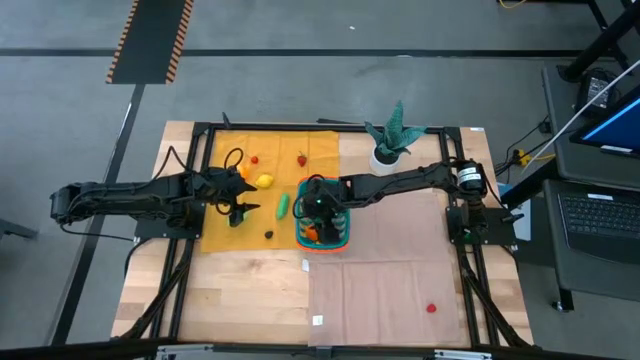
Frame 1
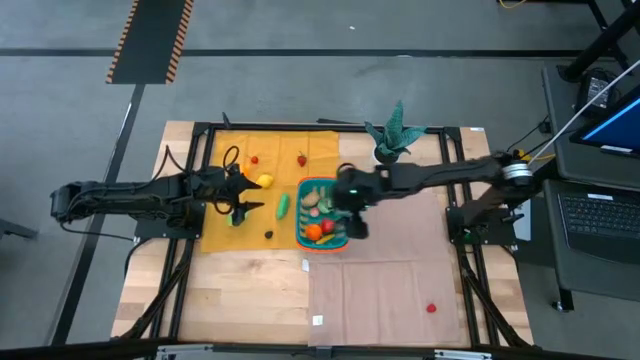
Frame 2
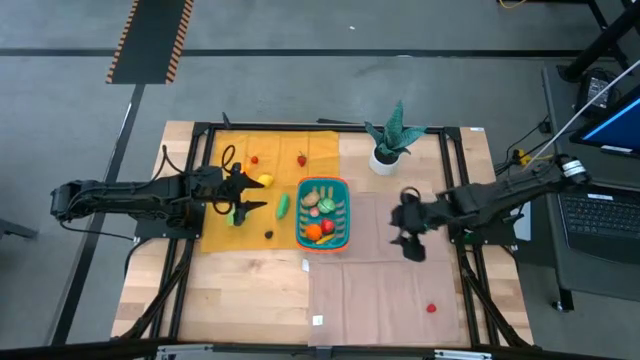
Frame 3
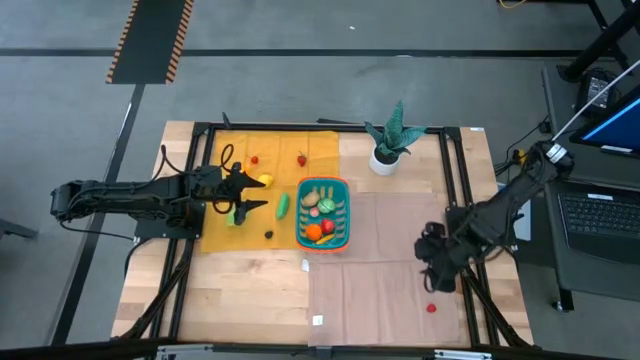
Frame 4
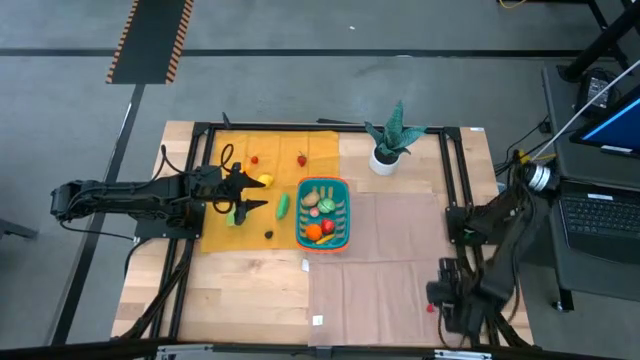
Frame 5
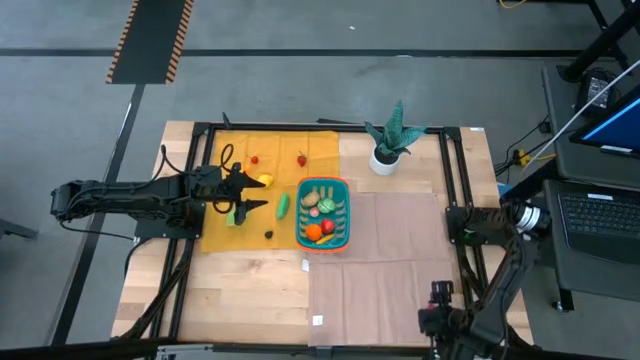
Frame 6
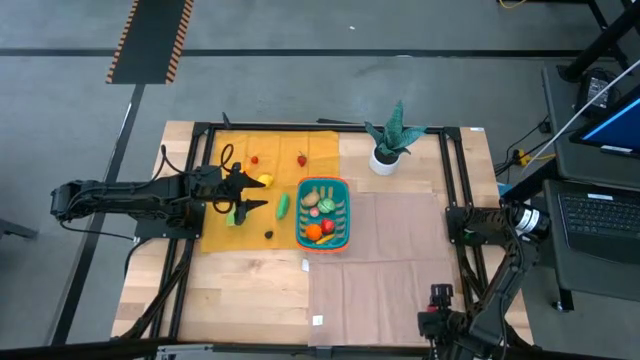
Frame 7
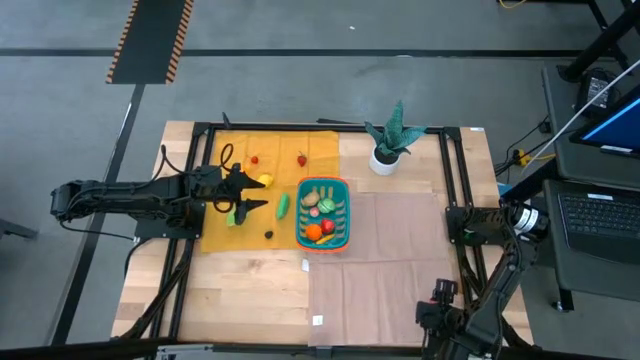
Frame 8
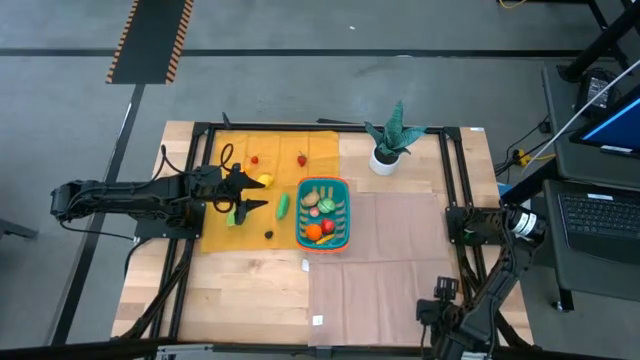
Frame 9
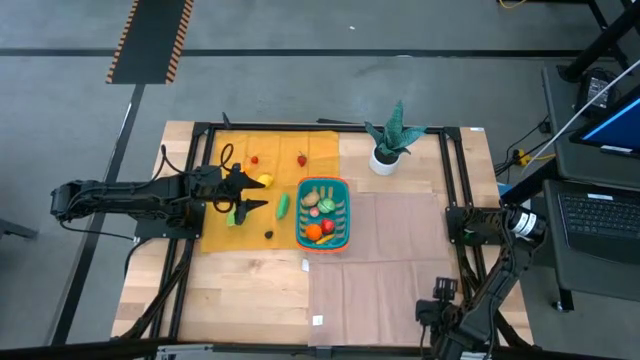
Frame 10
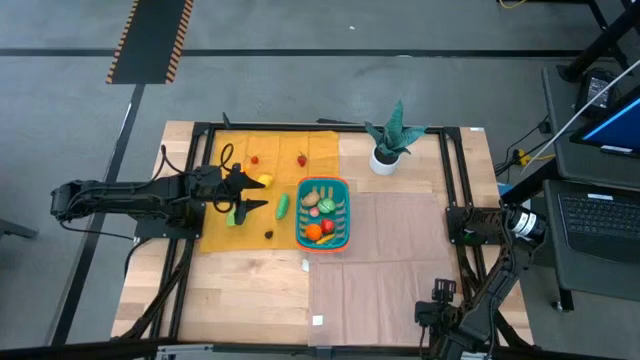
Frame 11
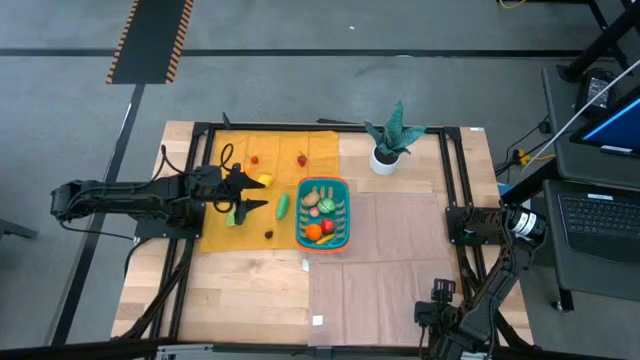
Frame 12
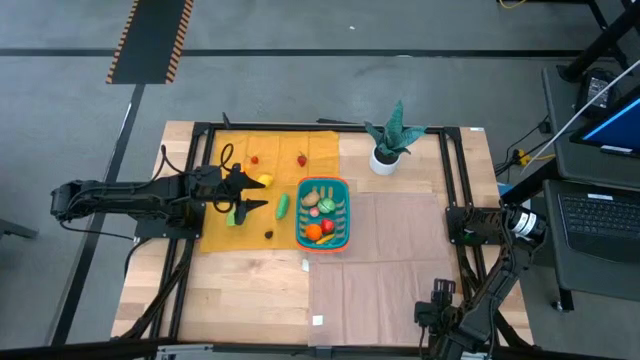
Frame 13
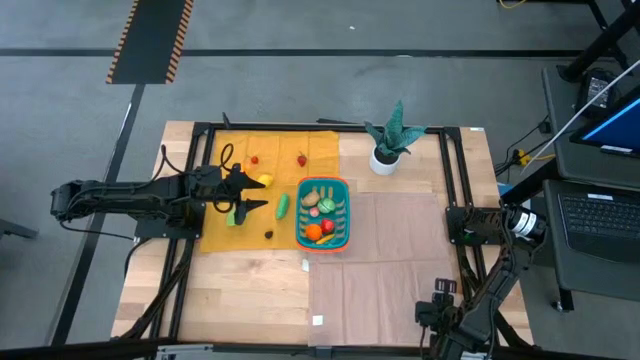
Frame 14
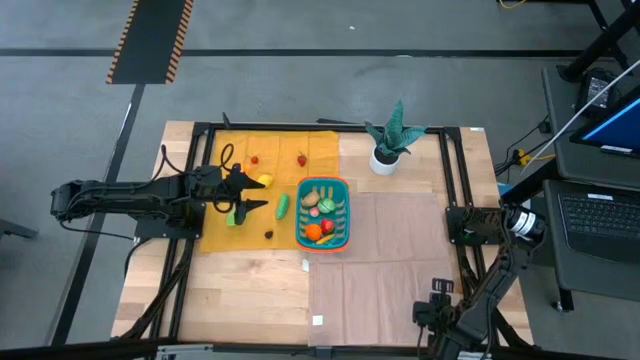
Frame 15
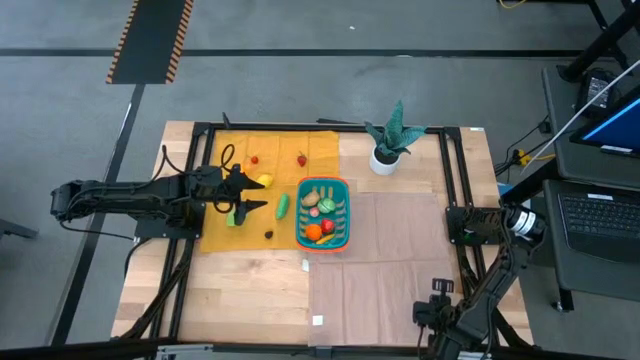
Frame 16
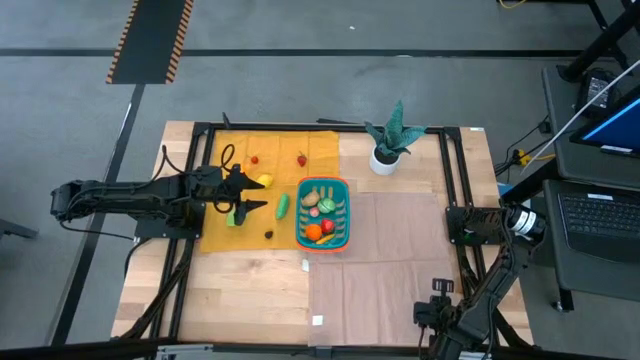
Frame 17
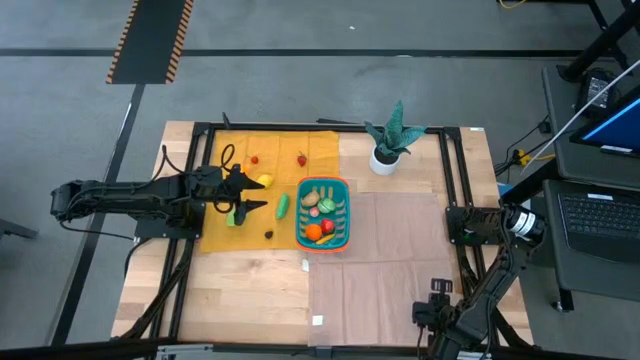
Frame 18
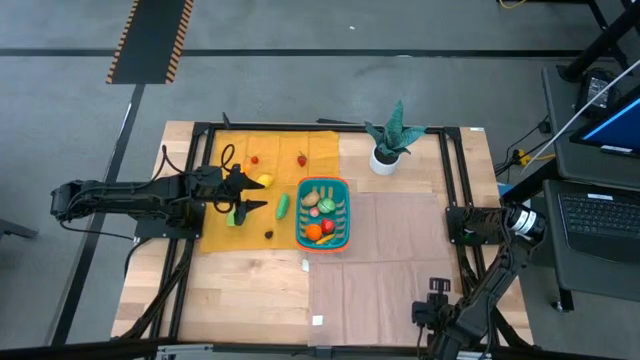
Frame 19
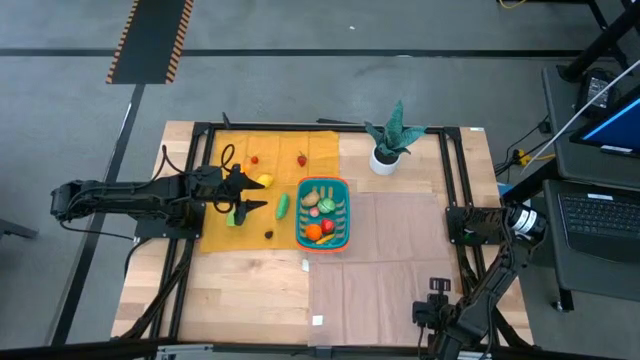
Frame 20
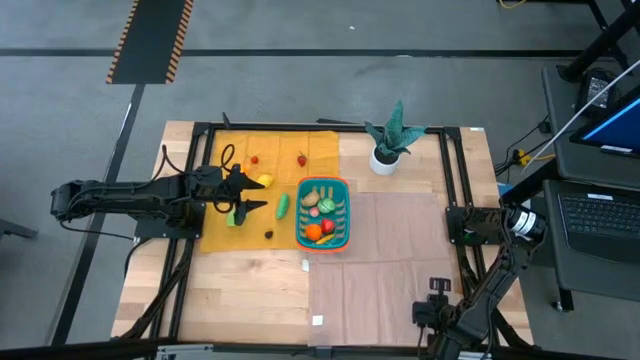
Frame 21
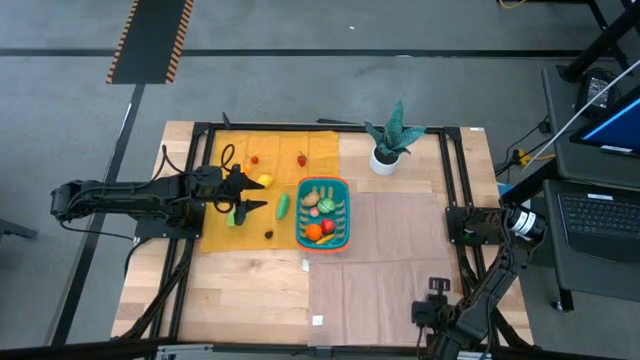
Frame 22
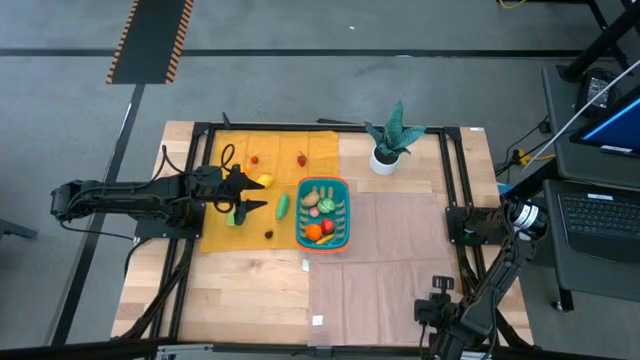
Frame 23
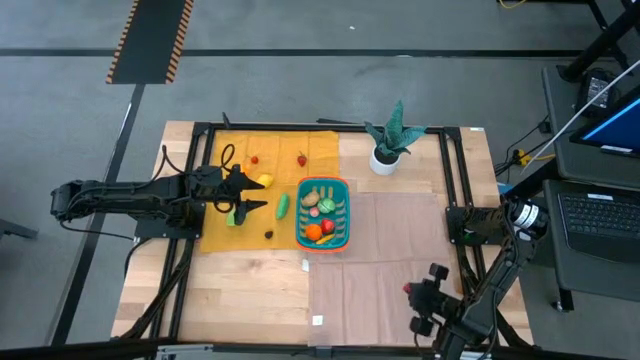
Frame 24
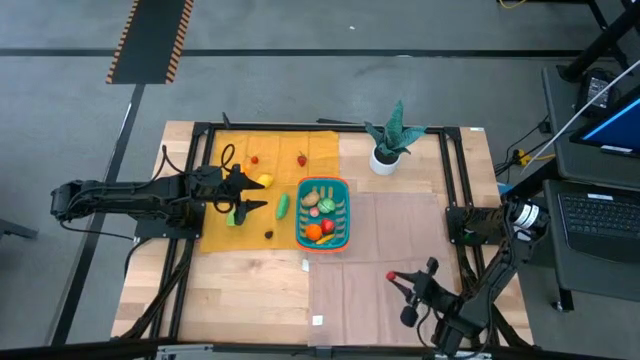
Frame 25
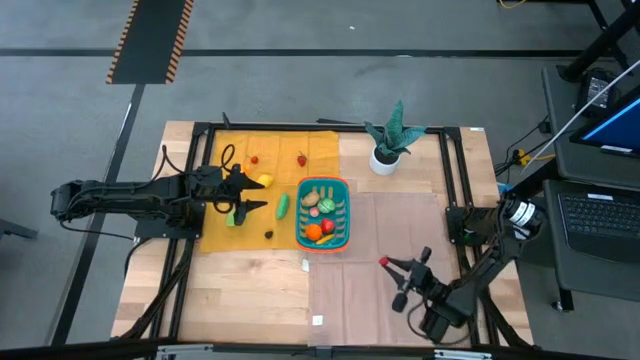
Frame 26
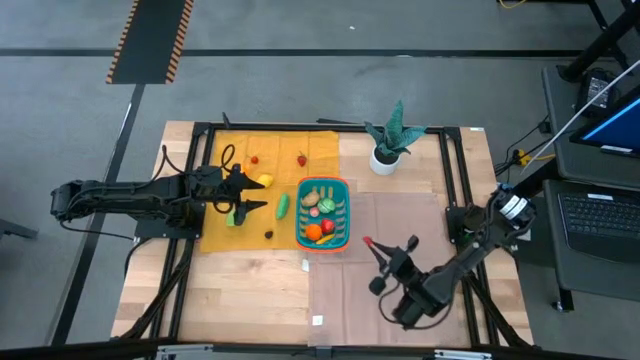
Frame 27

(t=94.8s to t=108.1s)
Task: Pick and placing Produce into tupperware
Put the bottom raspberry into the basket

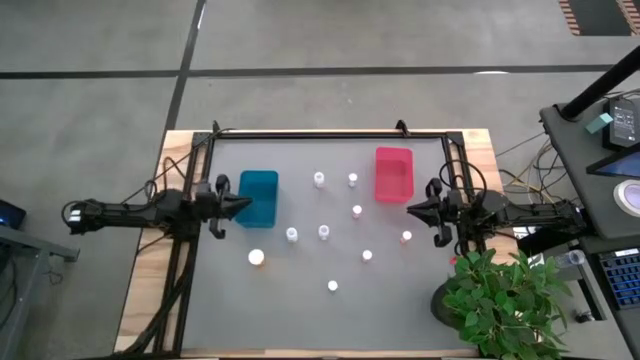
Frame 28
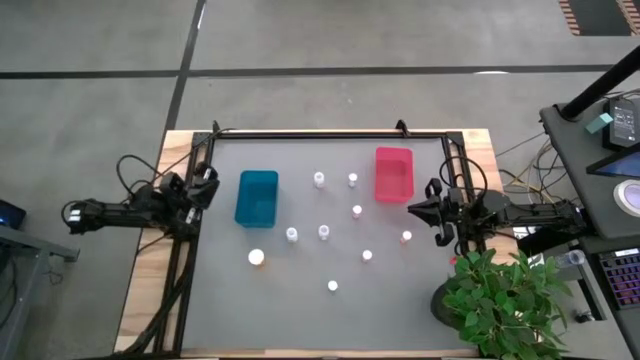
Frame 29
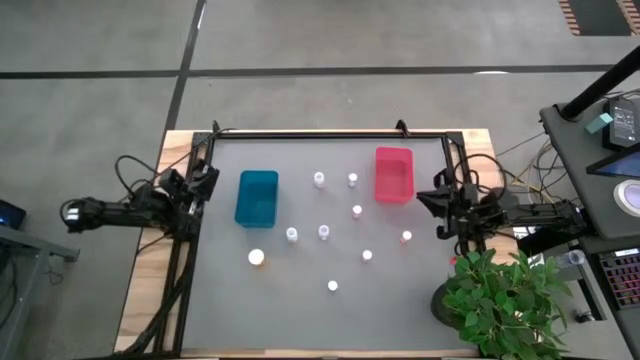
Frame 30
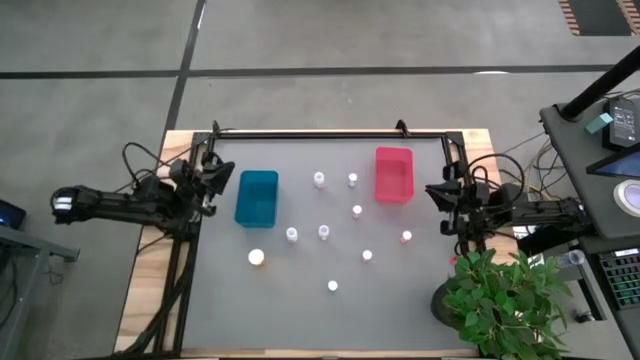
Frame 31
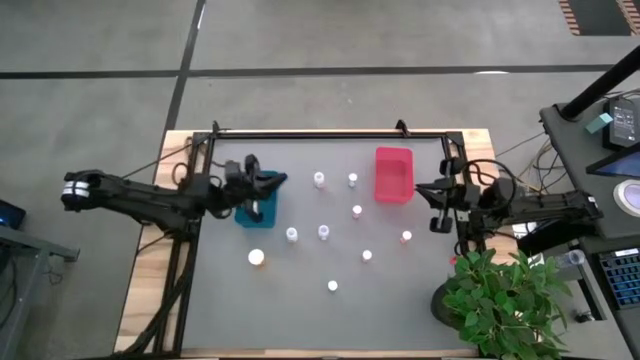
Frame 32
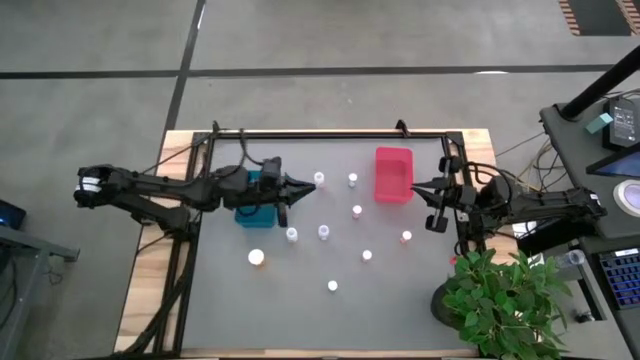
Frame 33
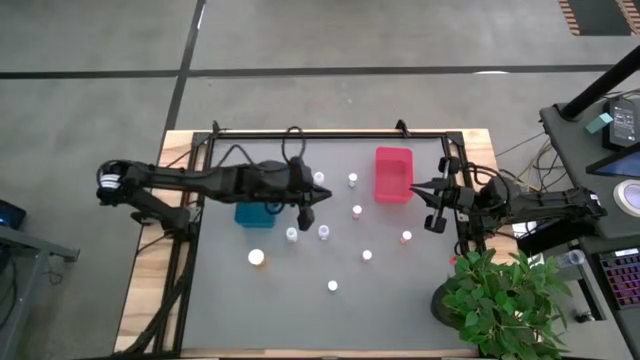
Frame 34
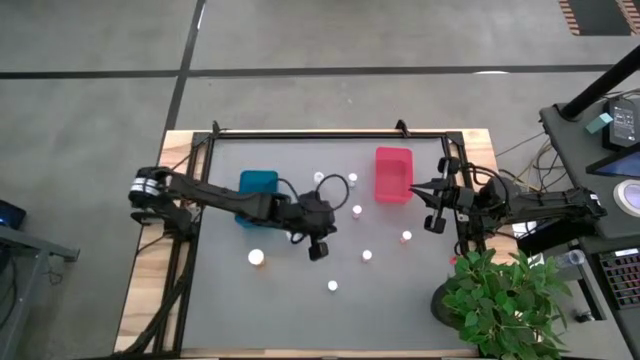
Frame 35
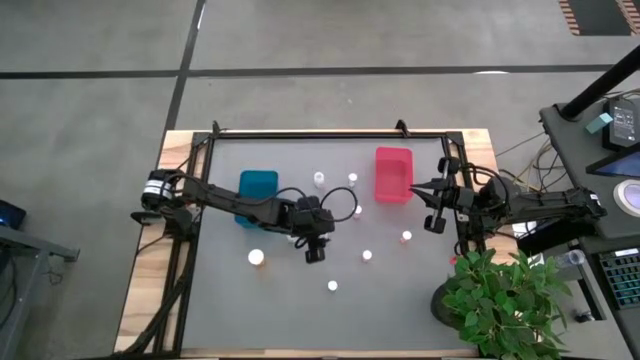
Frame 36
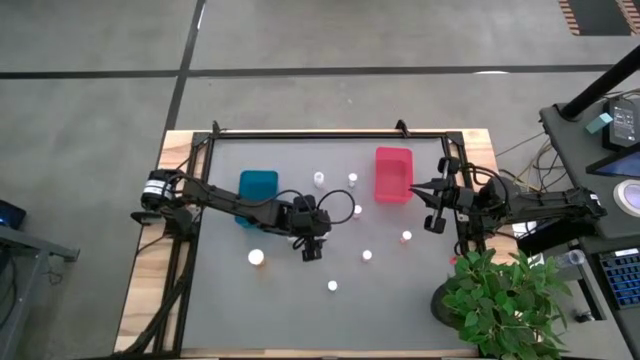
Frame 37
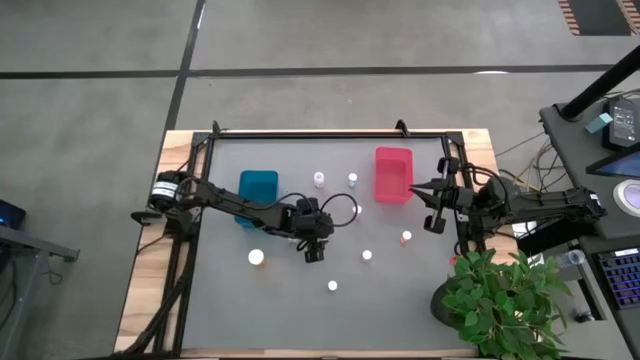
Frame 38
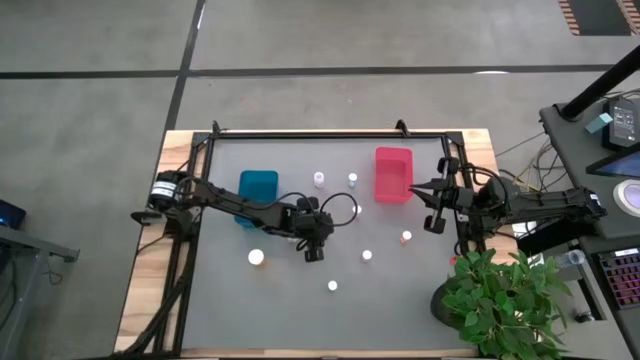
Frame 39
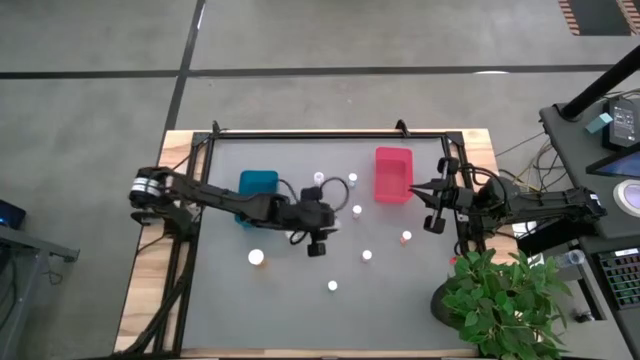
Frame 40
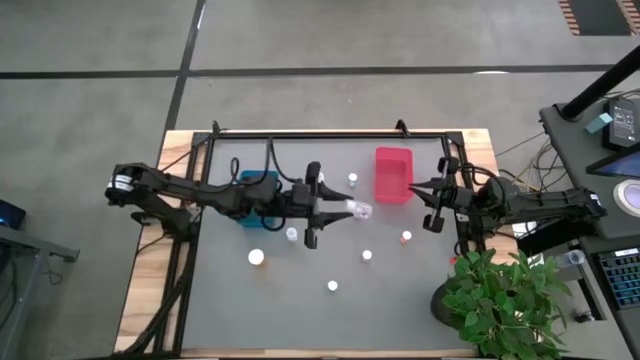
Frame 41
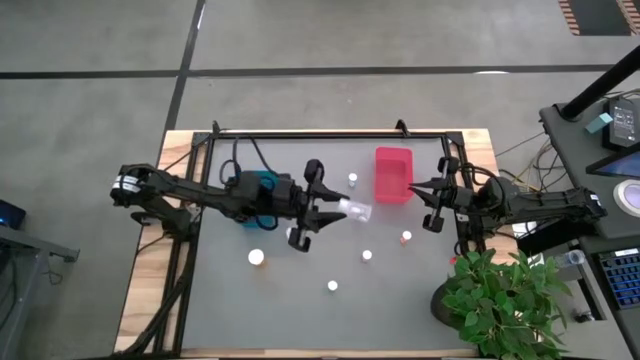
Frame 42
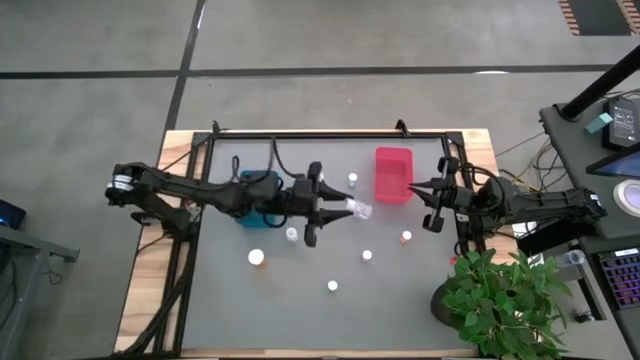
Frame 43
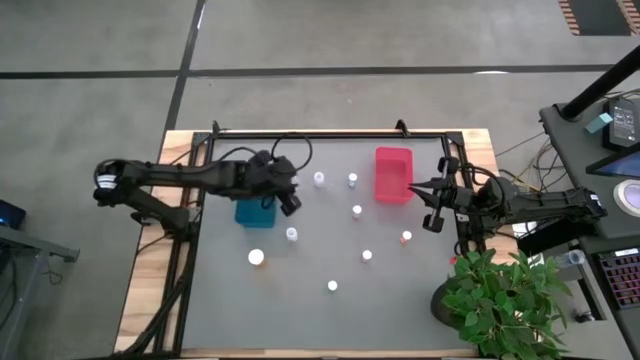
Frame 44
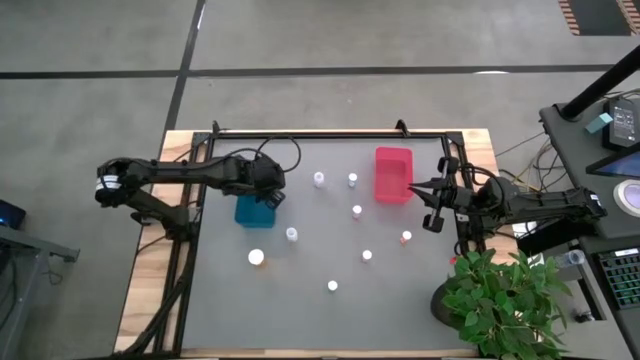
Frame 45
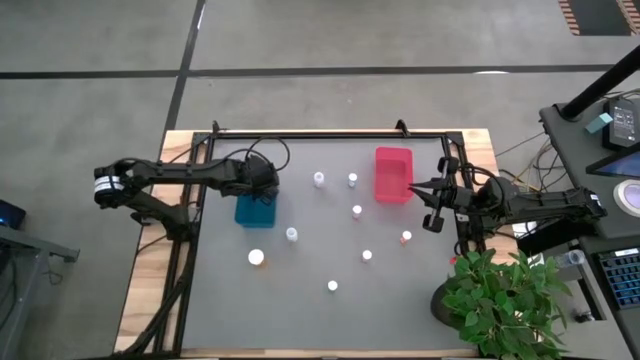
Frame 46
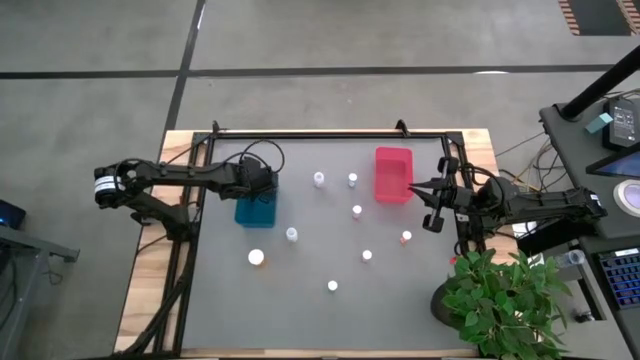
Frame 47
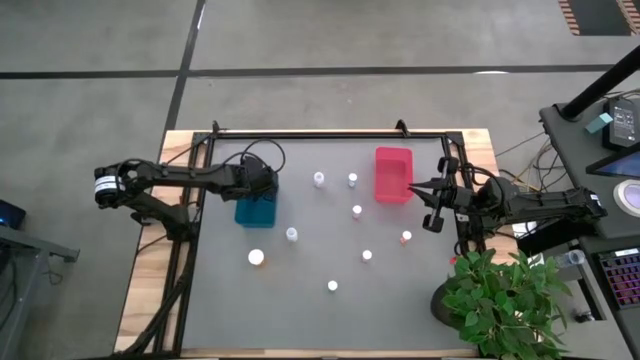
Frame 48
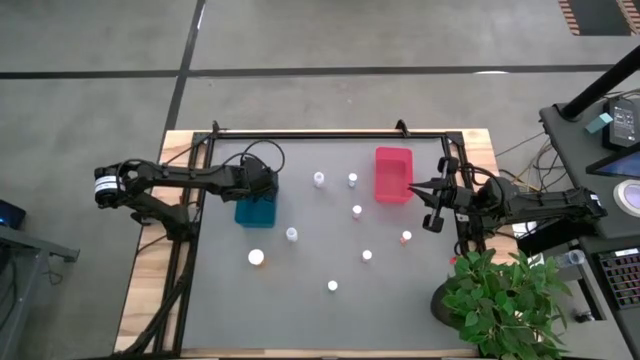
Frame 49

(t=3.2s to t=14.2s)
Task: Pick and place medicine bottles into bin by pill shape (circle, oval)
Put the bottom right transparent capsule bottle into the blue bin
